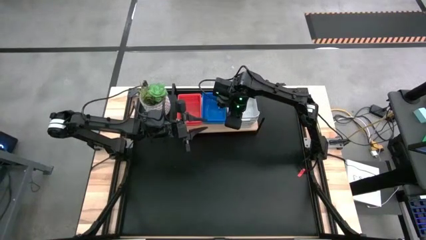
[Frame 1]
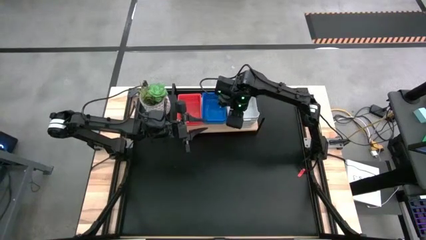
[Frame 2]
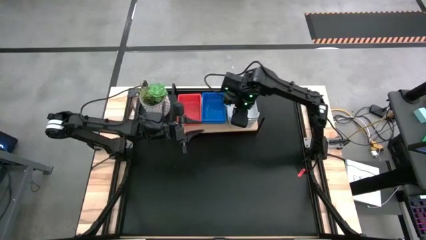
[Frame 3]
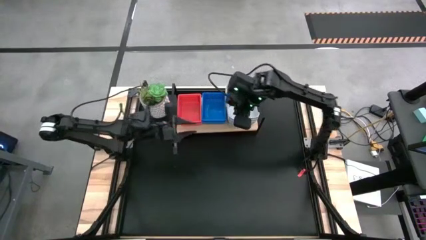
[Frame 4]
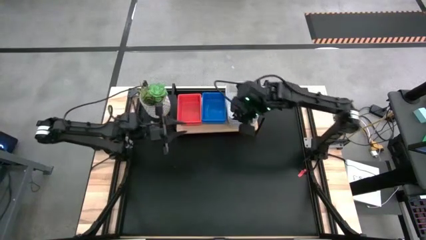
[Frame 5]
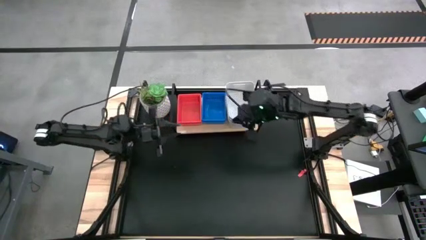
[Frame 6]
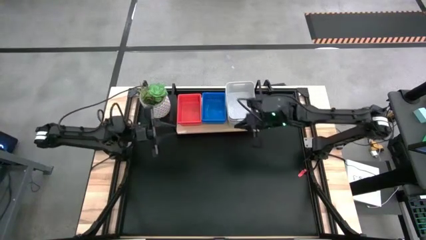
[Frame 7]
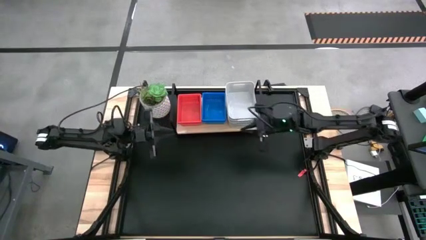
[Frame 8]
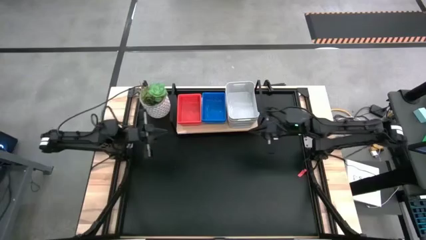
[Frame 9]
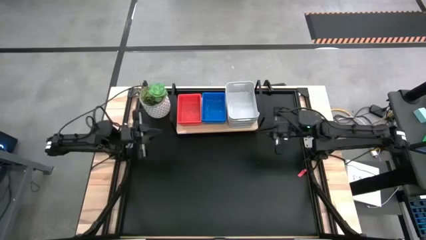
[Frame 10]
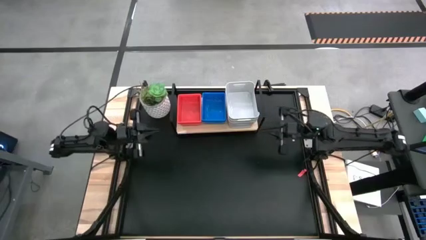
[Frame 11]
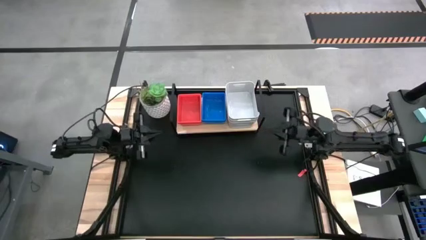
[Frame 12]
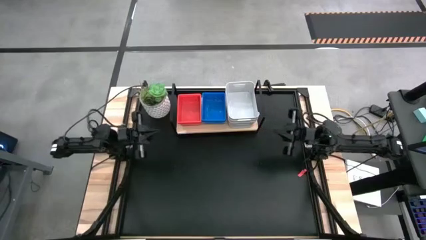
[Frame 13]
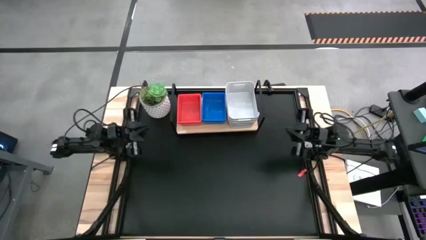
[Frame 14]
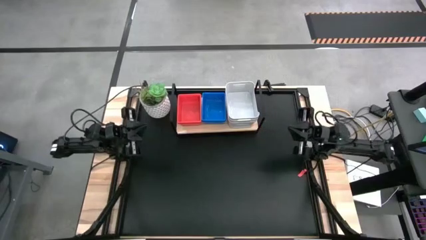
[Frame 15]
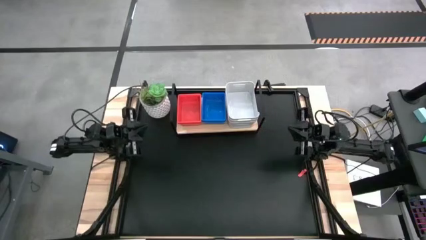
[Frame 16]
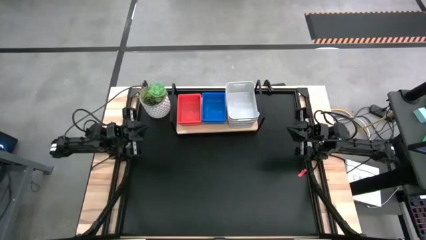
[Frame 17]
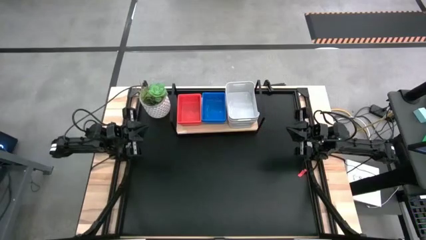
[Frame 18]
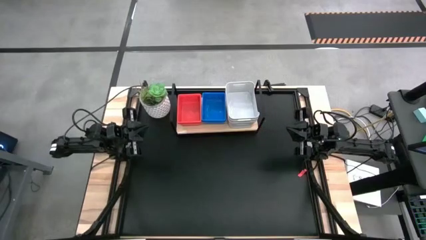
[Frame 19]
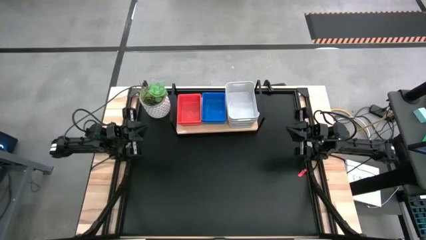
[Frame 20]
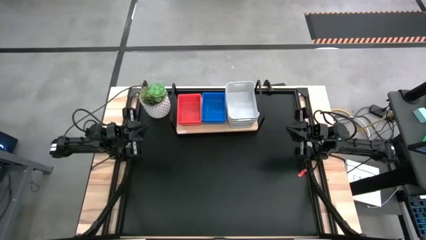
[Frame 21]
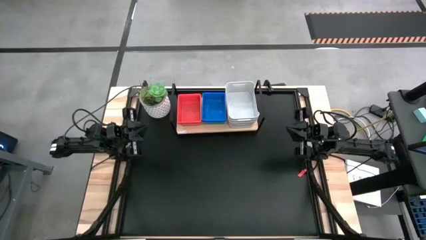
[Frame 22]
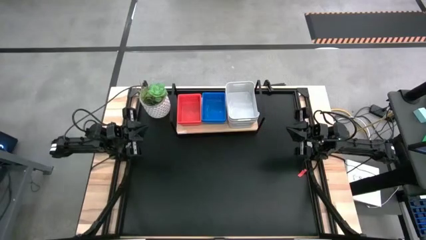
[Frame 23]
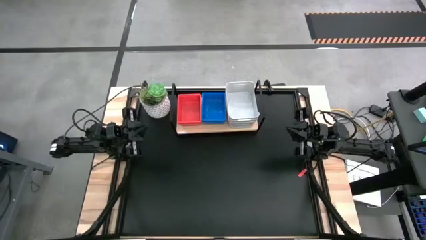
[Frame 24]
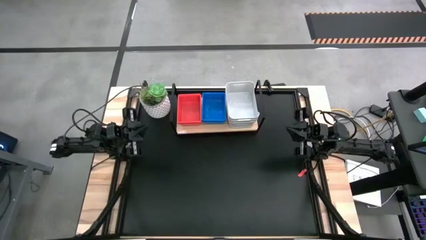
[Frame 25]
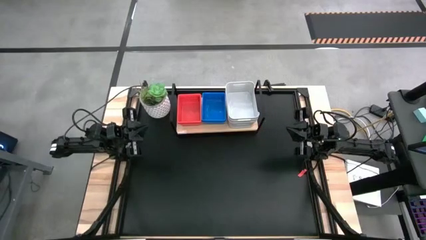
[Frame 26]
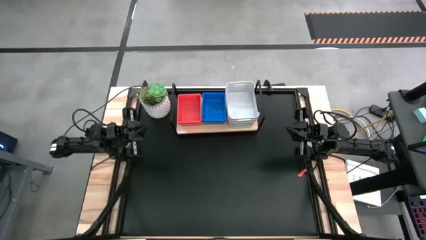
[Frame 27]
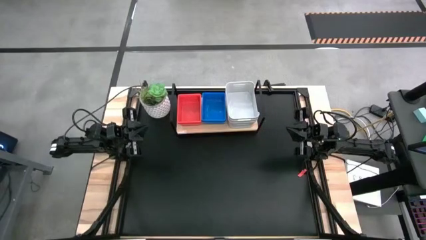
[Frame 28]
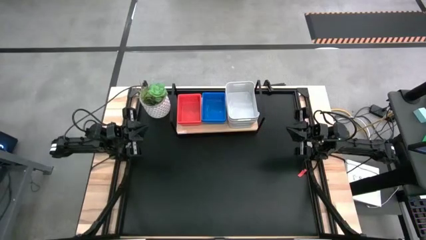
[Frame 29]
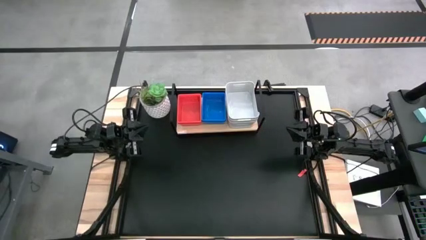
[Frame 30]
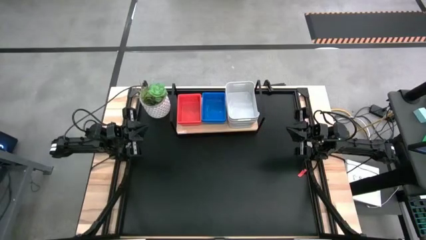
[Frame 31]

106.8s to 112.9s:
Return to Home Position

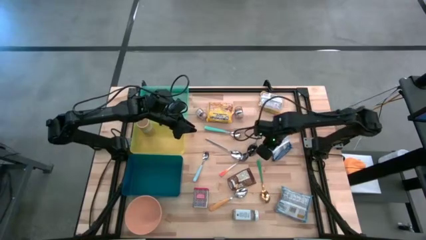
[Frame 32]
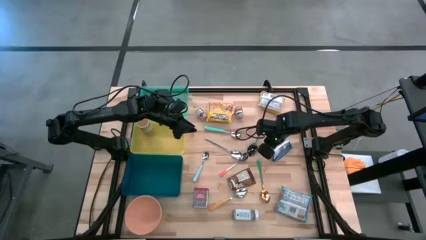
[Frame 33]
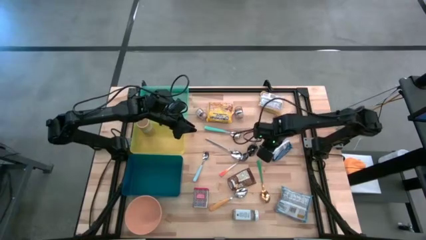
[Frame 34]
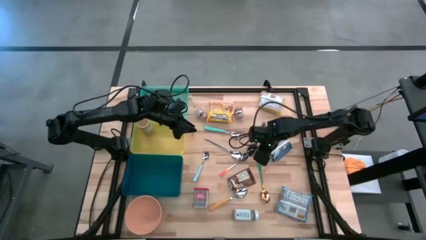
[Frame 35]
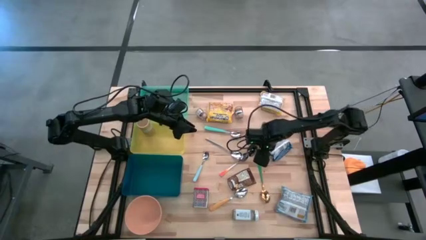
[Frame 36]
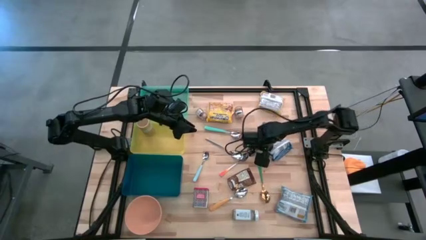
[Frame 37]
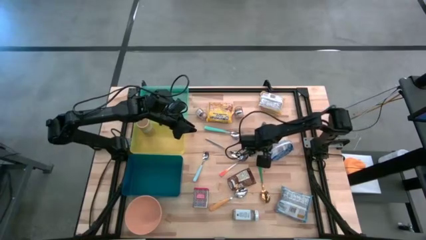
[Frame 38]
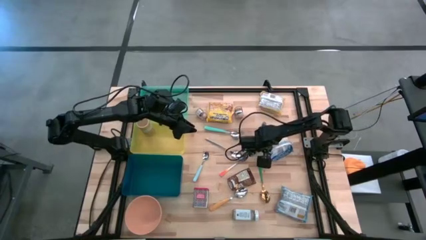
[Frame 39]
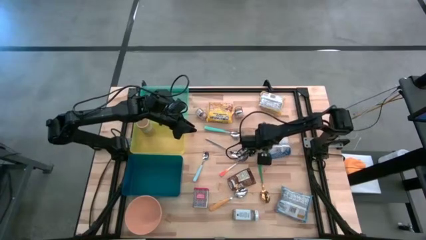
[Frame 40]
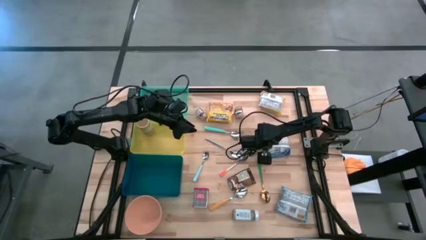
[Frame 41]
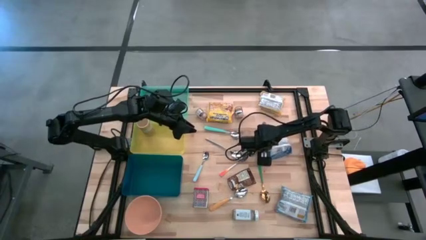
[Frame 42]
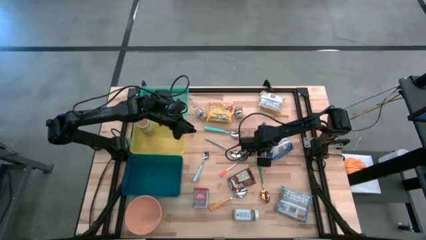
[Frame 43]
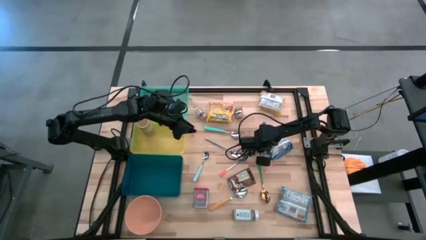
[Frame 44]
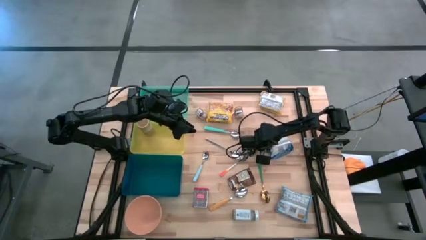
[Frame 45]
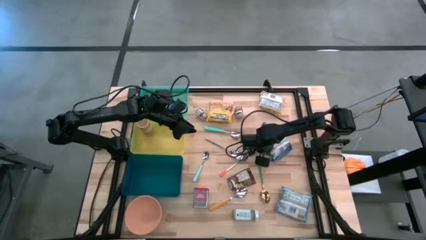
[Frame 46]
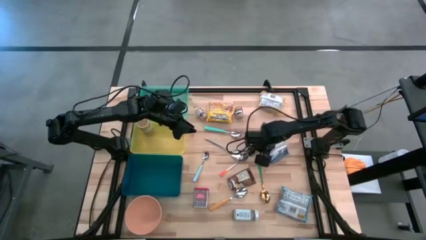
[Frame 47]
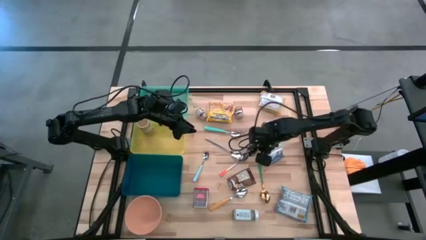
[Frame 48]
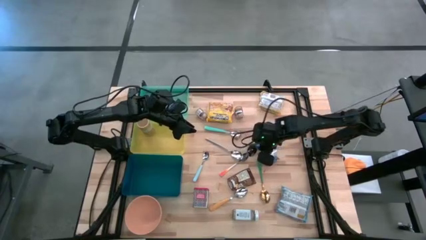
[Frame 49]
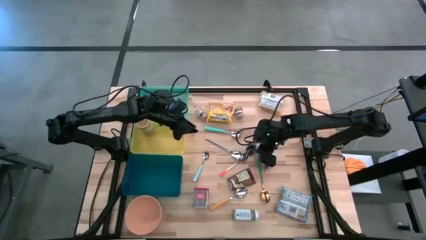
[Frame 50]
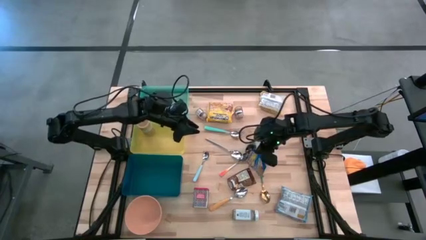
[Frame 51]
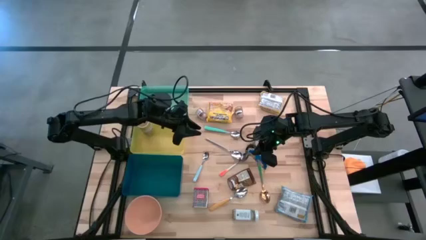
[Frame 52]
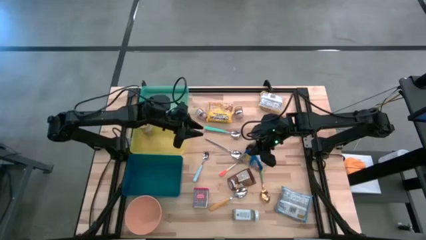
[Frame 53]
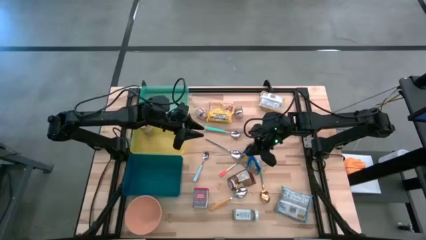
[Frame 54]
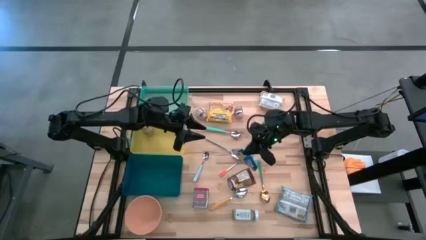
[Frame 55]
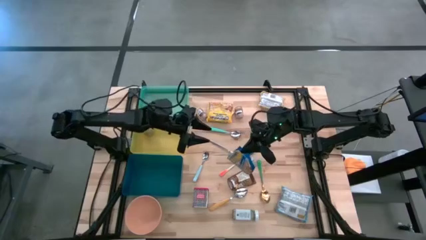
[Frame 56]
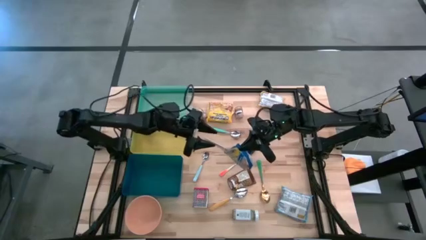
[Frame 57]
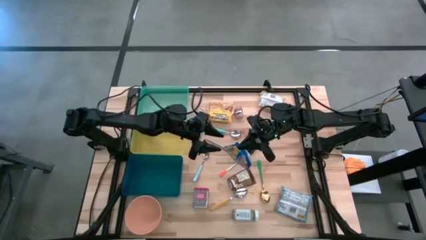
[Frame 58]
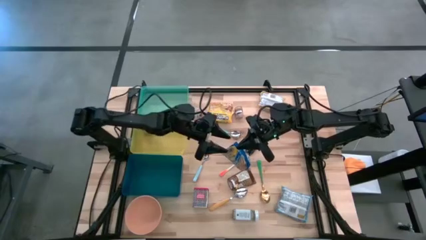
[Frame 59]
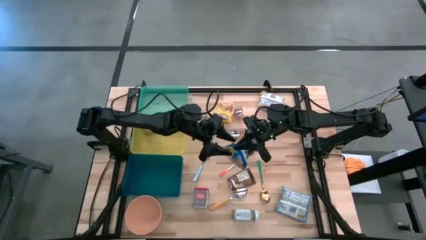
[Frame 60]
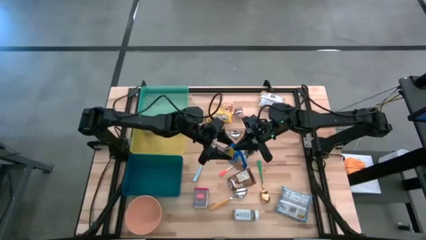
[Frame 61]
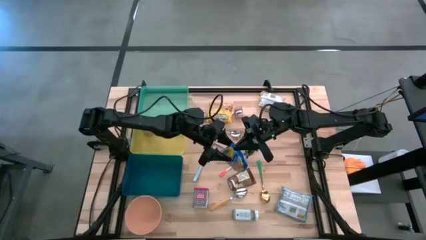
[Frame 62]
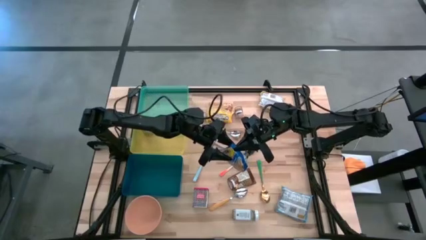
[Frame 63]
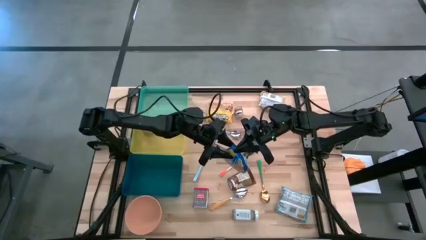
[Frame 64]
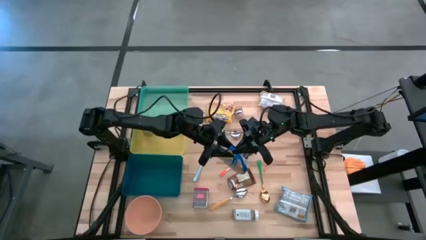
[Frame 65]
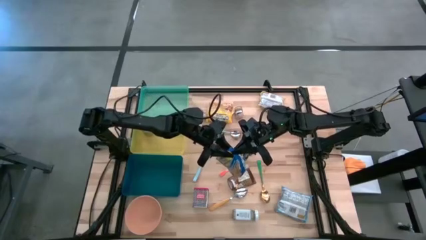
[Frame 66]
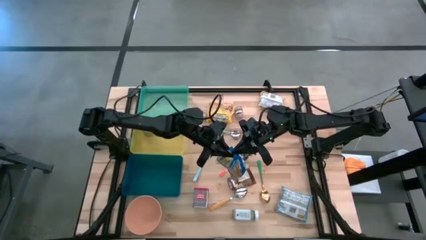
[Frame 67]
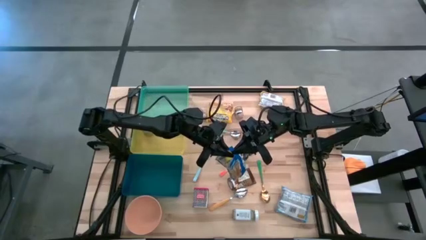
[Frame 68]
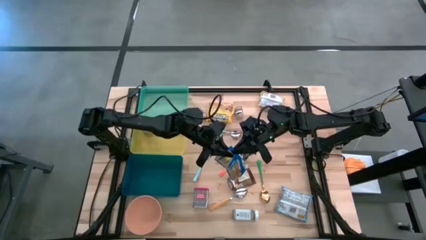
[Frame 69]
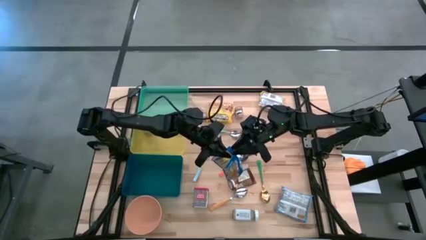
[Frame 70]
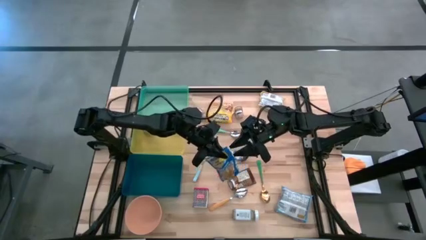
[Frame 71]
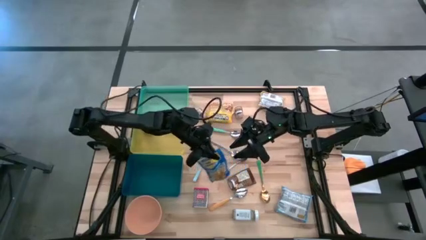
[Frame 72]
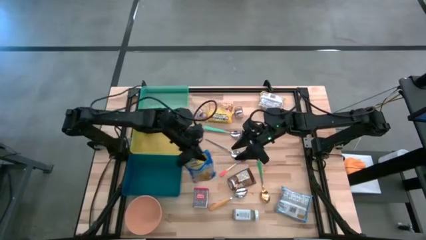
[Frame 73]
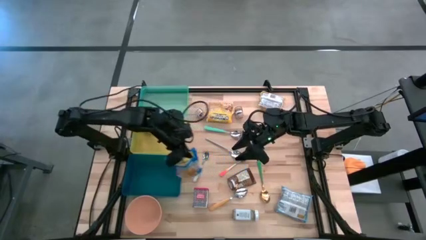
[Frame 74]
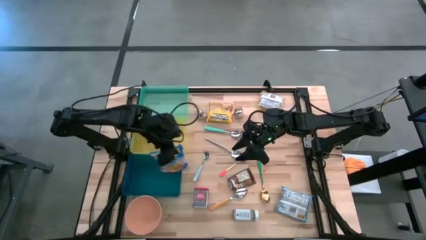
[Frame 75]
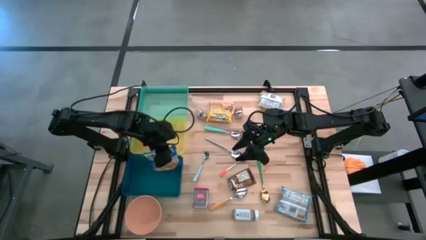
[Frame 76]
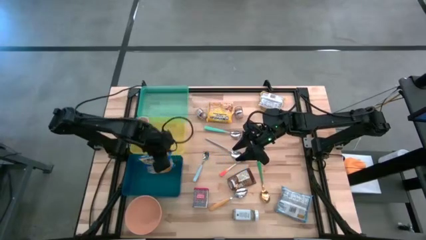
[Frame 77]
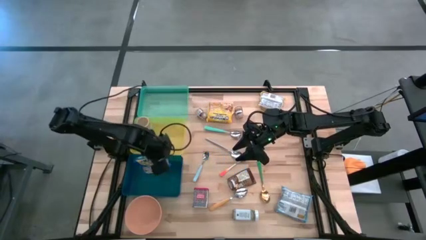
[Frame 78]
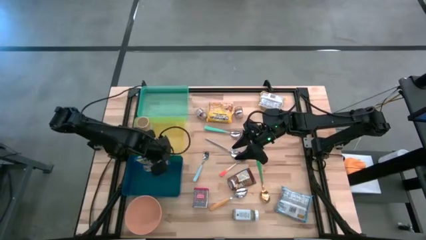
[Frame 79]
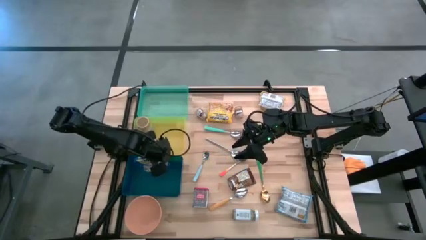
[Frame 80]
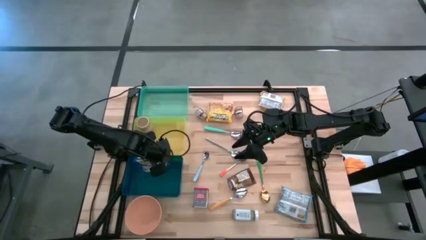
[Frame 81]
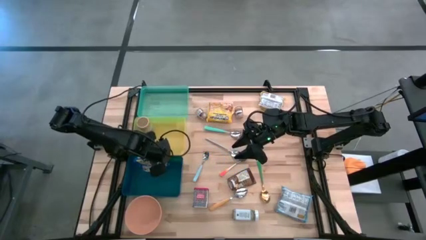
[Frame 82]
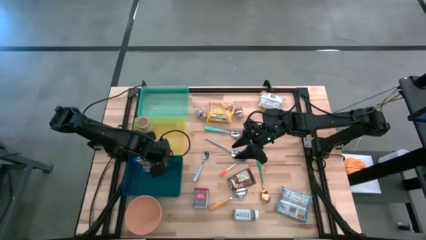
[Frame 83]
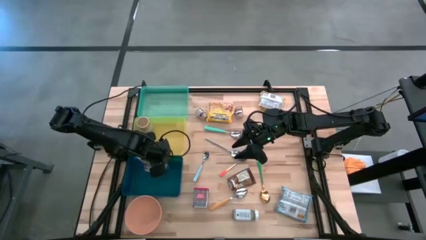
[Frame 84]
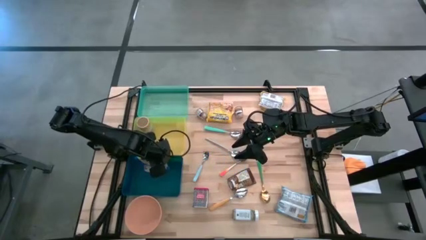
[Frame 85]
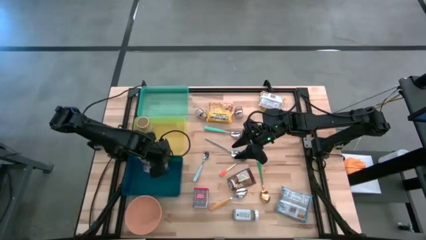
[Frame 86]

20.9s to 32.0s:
Put the blue noodle pack into the blue bin
